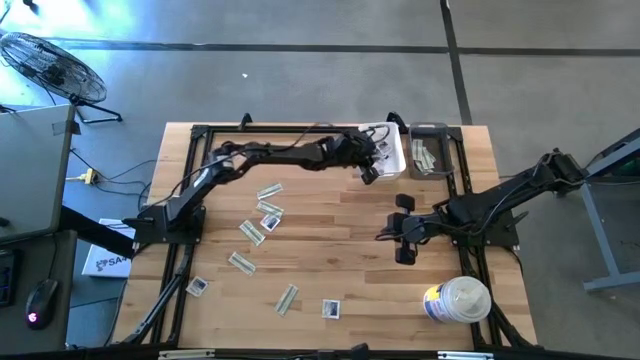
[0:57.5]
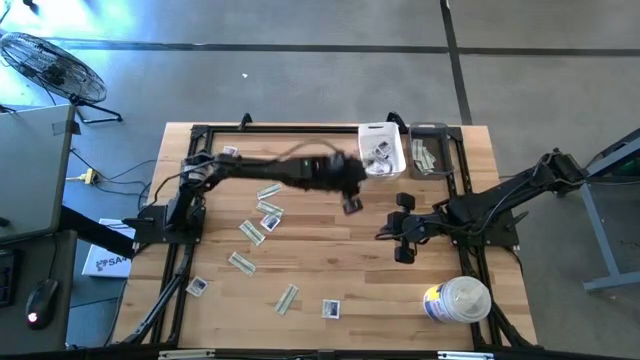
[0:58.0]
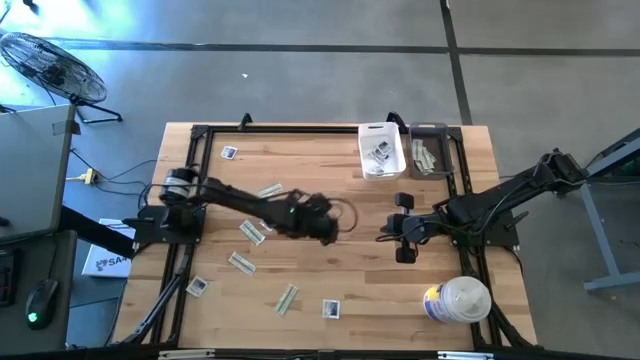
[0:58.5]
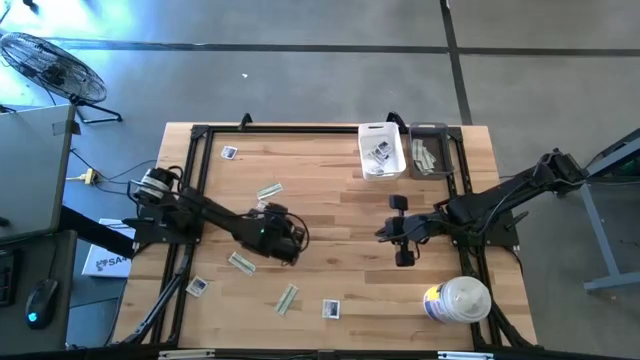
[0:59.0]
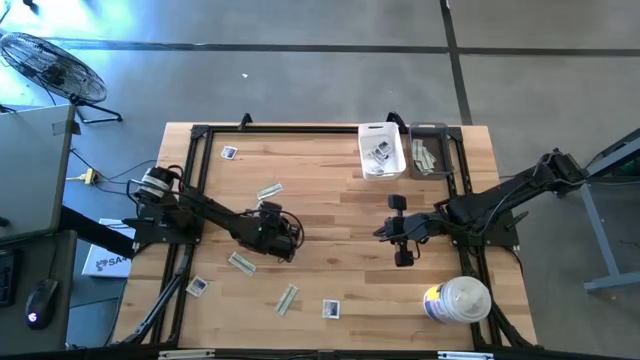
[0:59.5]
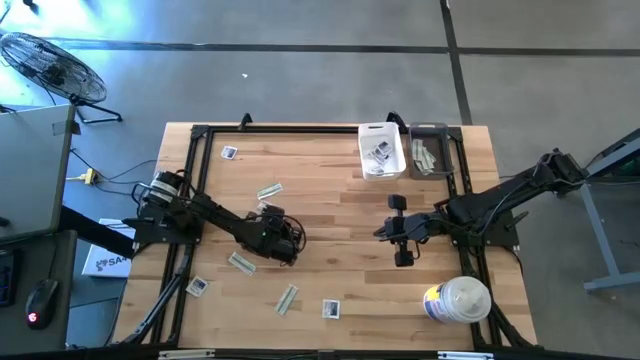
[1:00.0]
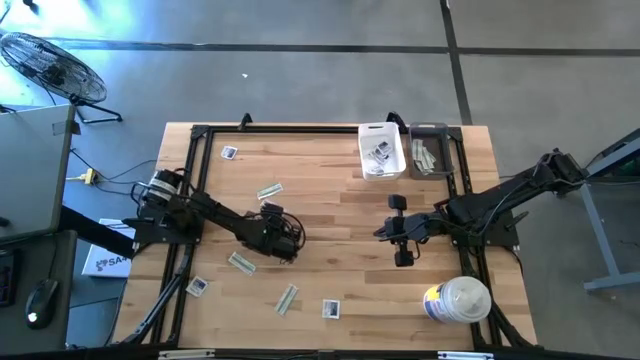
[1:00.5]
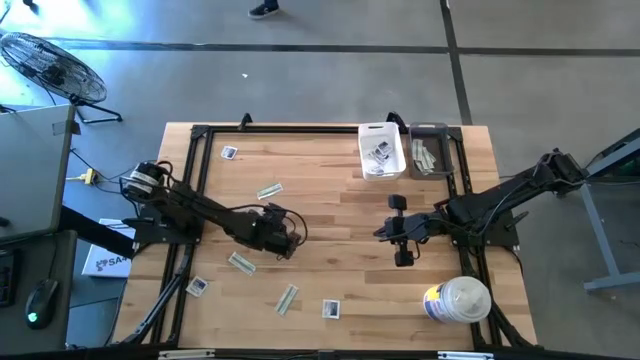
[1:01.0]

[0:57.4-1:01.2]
Task: Pick & Place First Aid Supplies
Put the alcohol pad into the white bin

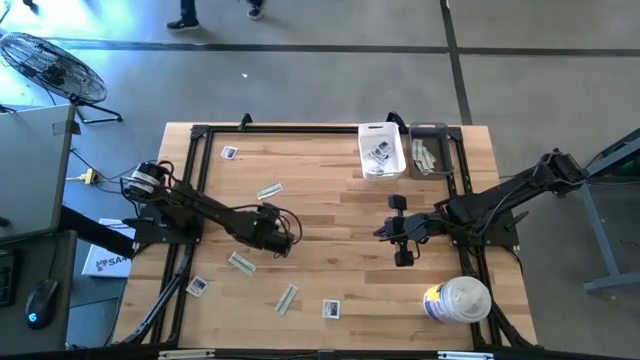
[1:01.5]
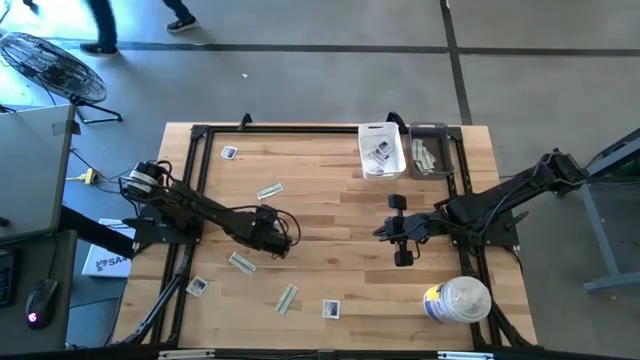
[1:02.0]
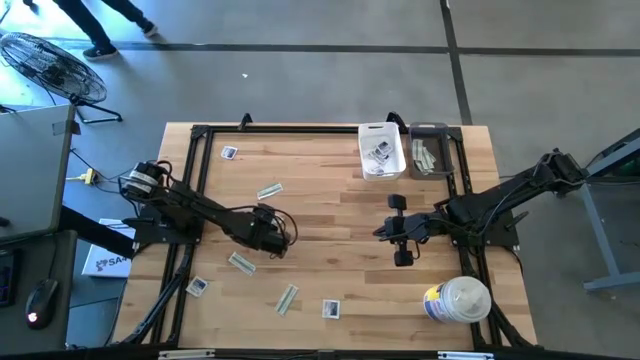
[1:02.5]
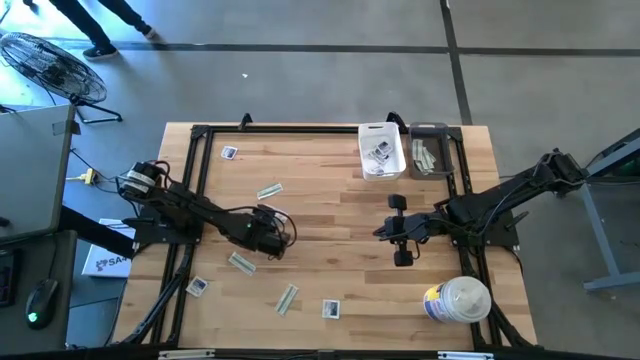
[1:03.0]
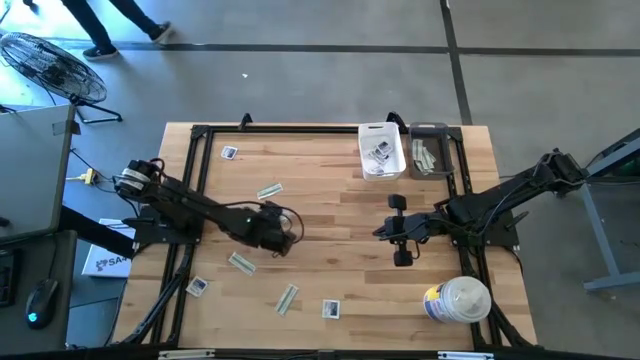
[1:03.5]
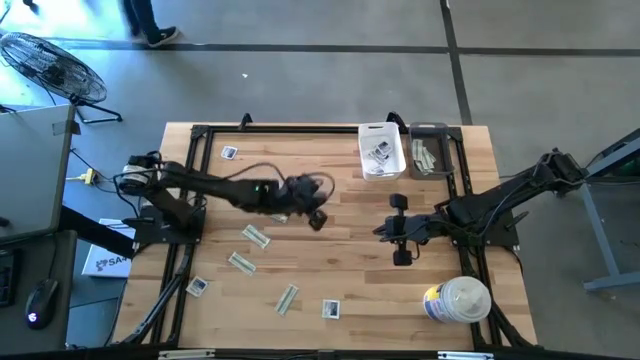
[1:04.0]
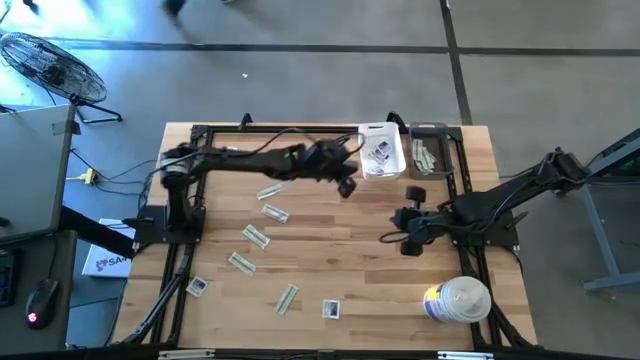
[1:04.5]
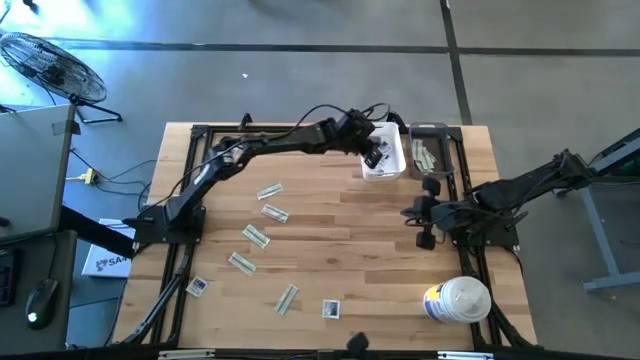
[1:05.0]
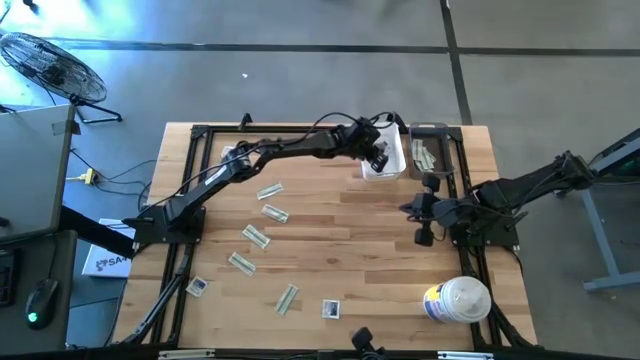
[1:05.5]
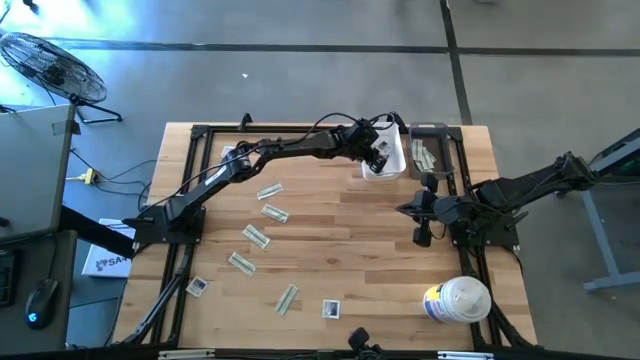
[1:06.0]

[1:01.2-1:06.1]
Put the alcohol pad into the white bin

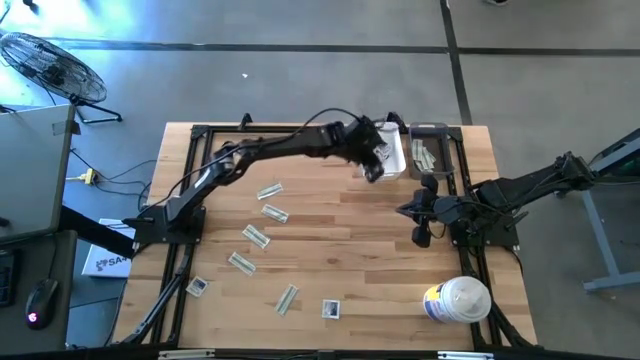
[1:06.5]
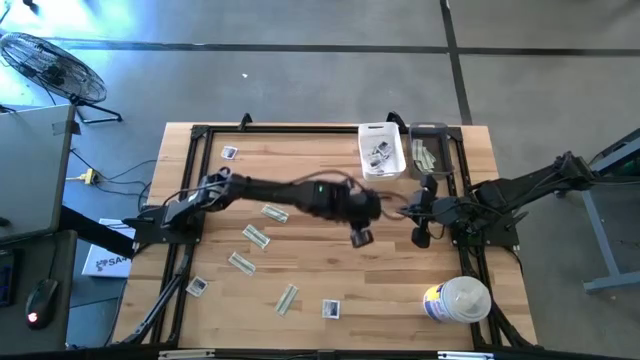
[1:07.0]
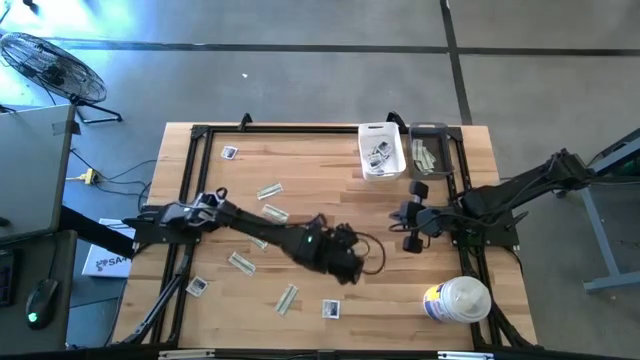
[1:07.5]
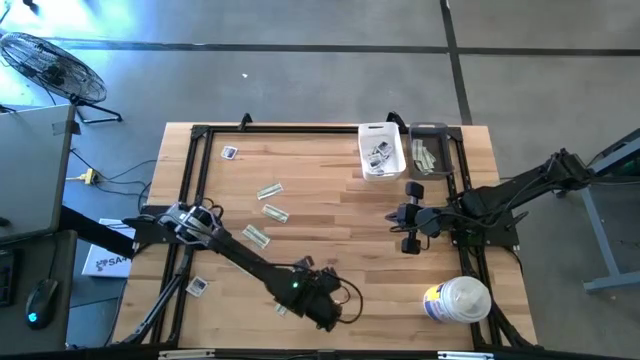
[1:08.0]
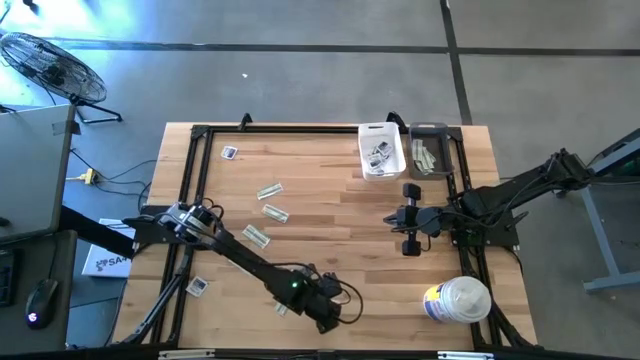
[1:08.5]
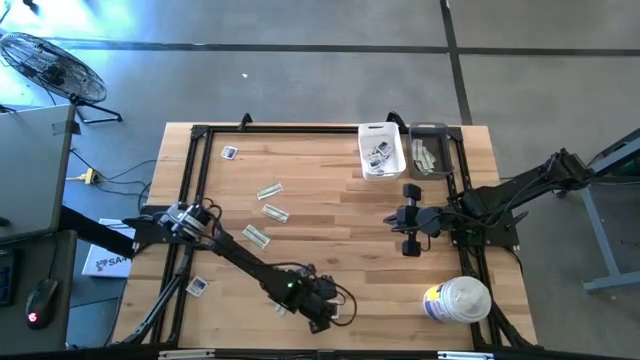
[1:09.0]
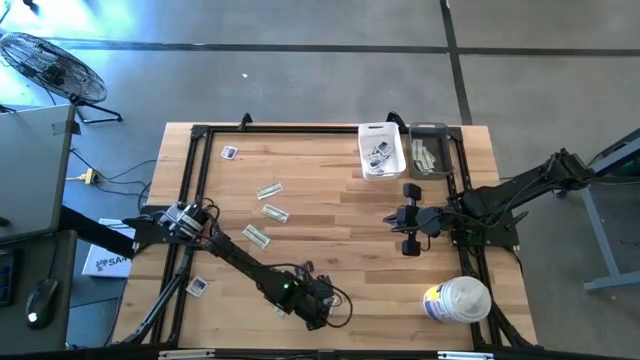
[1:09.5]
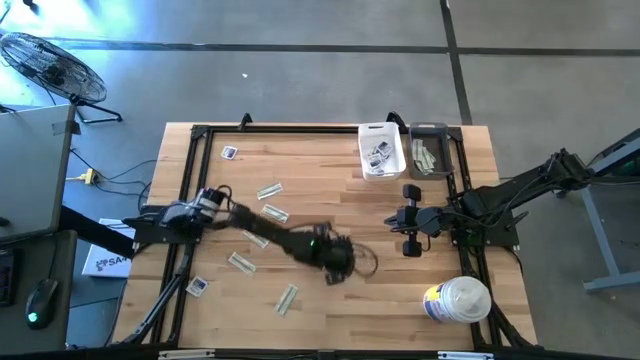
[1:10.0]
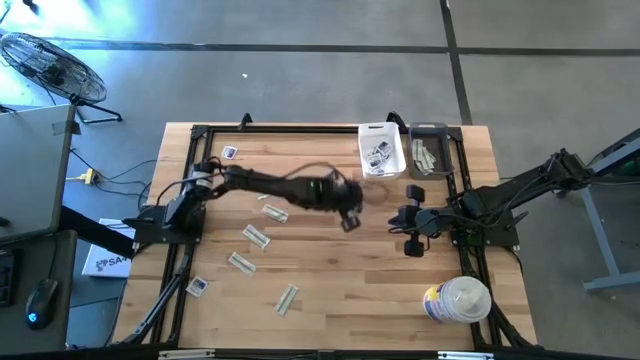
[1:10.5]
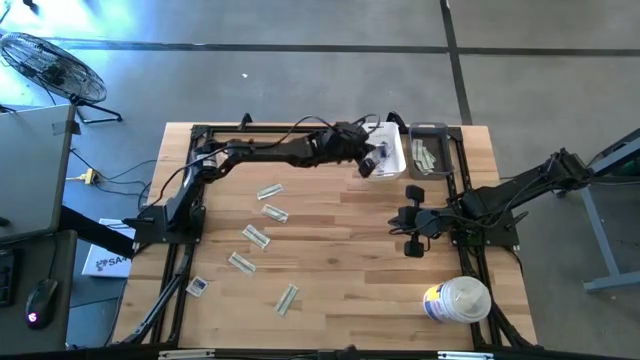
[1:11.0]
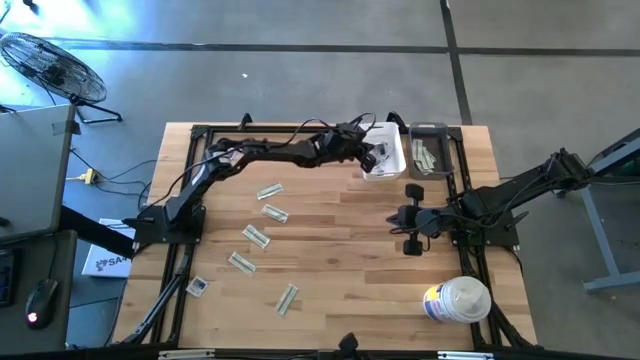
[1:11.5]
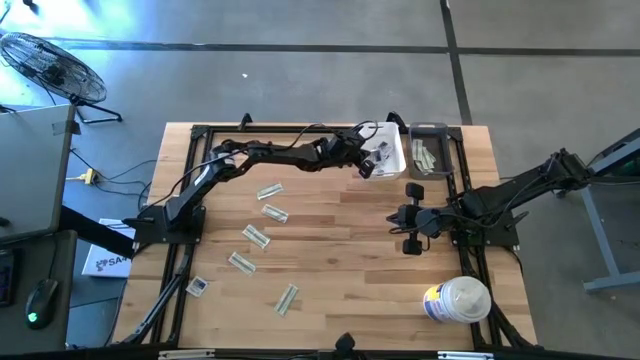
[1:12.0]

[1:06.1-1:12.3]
Put the alcohol pad into the white bin

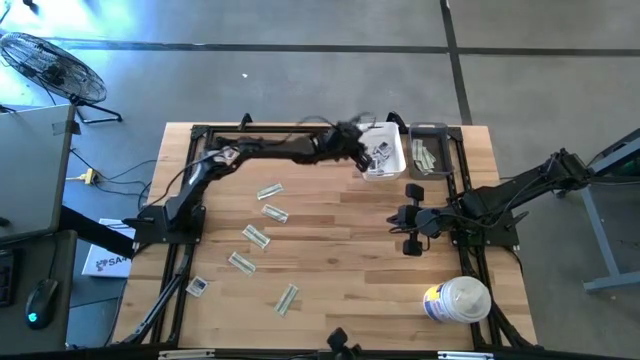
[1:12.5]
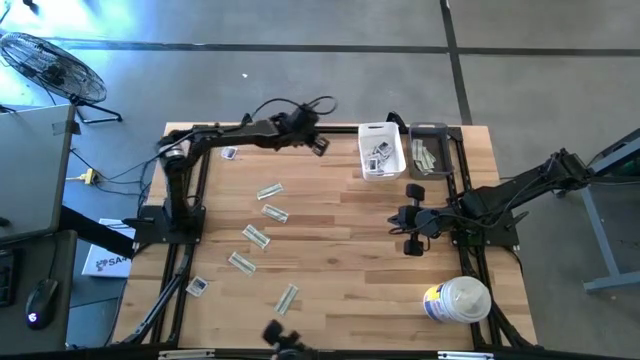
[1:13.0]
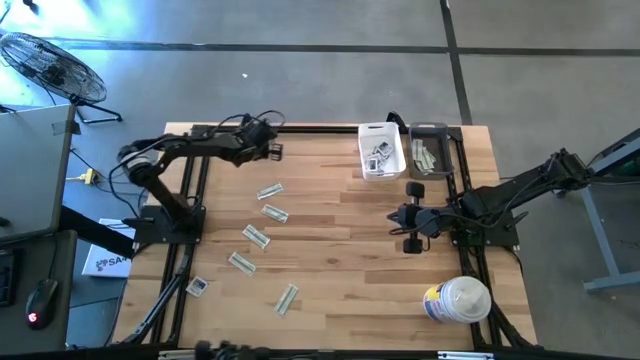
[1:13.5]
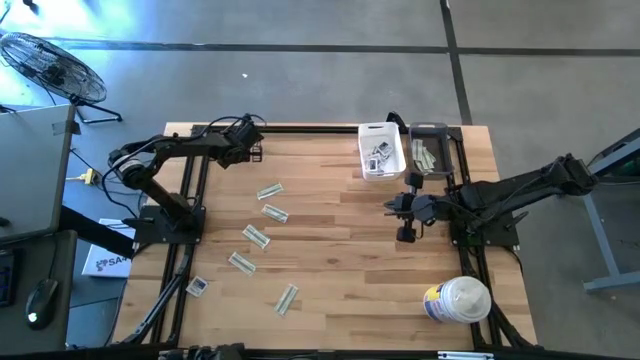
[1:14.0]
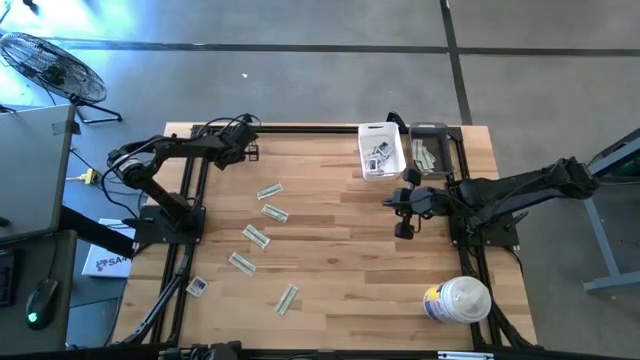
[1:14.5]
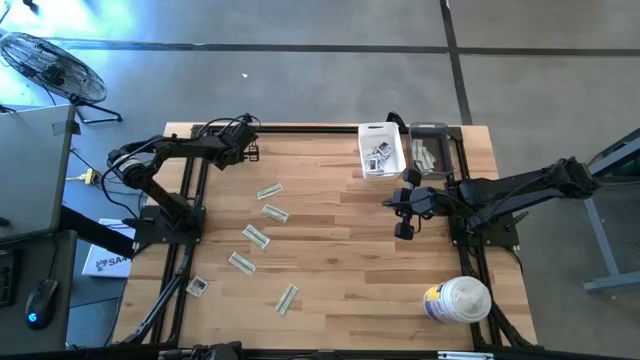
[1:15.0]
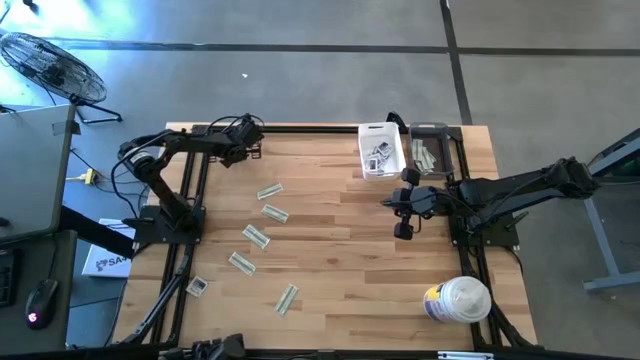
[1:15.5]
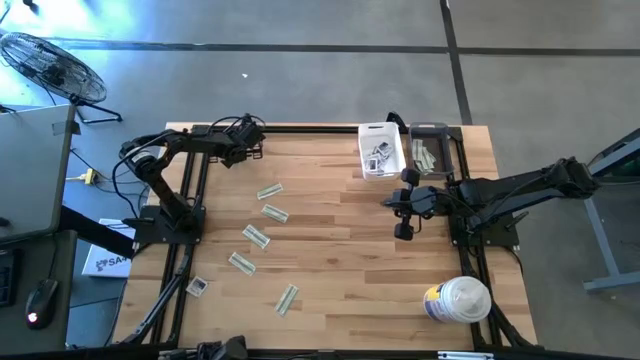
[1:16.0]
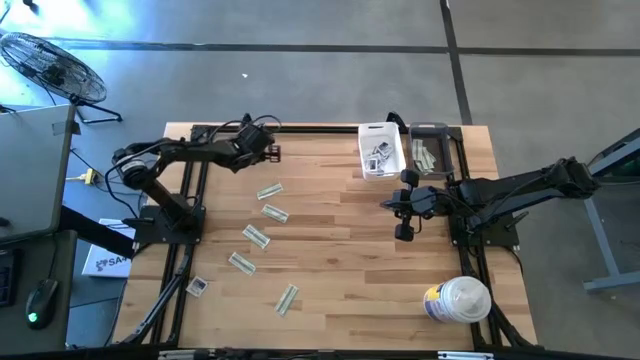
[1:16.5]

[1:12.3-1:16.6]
Put the alcohol pad into the white bin

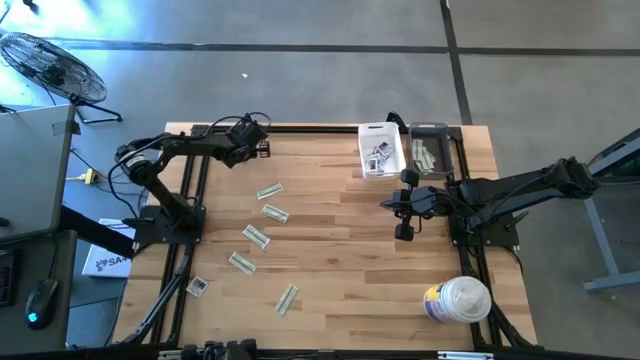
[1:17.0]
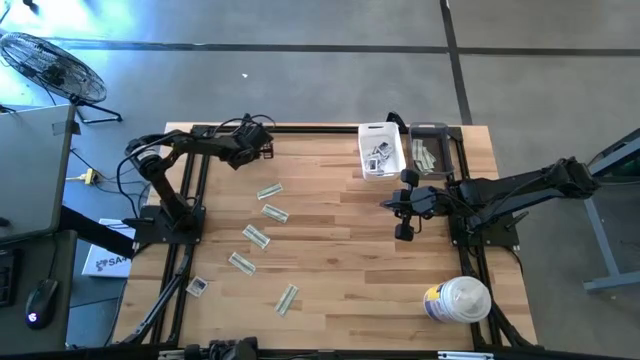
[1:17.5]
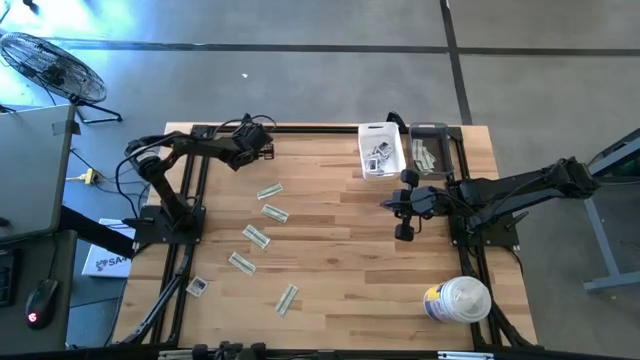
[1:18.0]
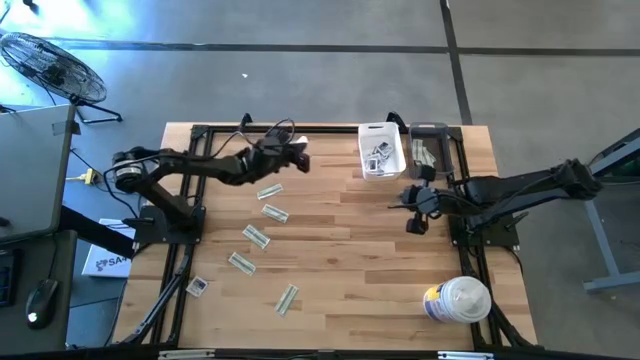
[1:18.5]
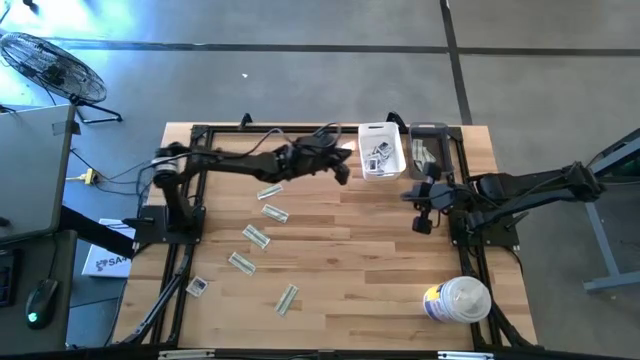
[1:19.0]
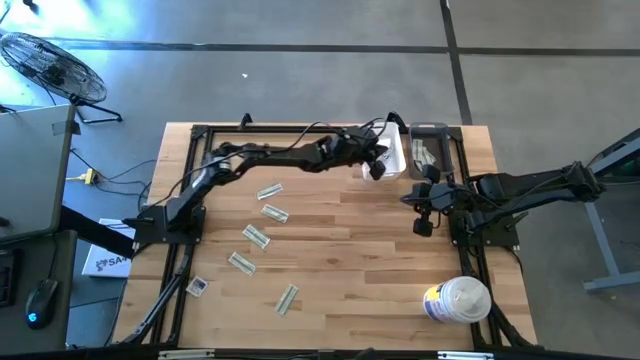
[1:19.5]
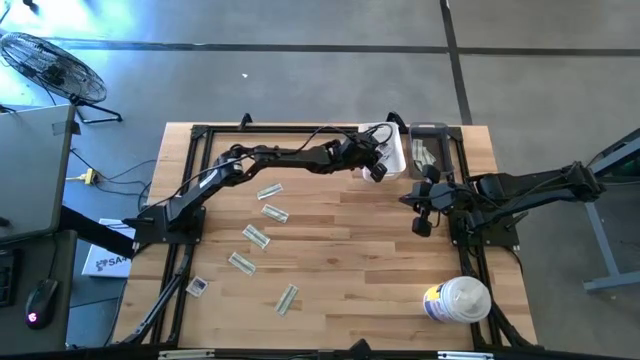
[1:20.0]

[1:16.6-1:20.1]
Put the alcohol pad into the white bin
